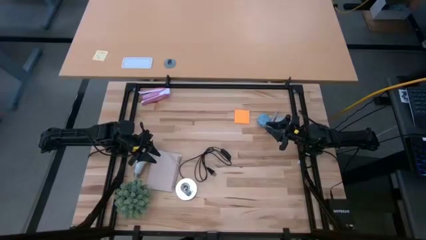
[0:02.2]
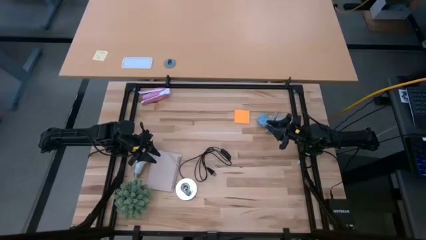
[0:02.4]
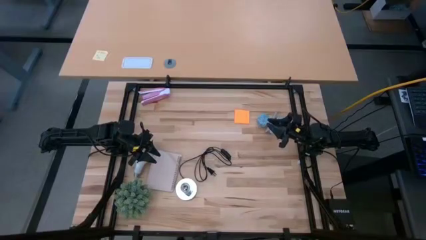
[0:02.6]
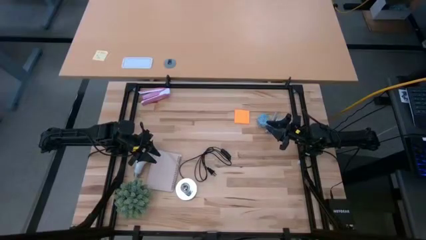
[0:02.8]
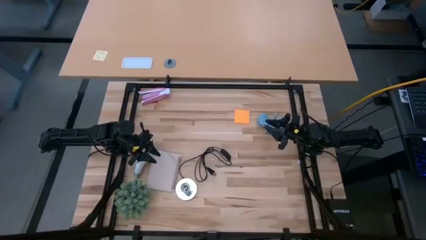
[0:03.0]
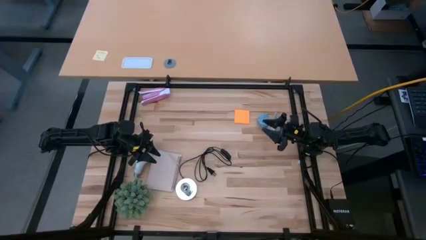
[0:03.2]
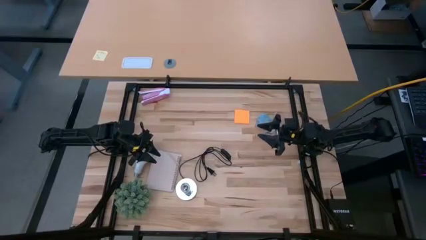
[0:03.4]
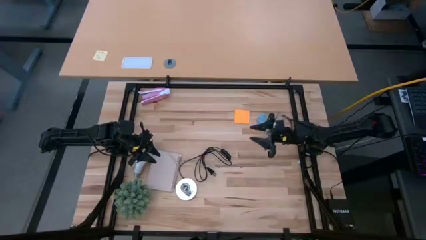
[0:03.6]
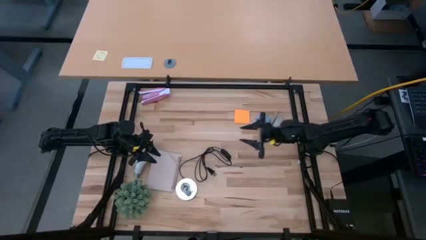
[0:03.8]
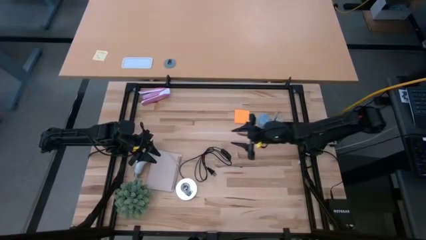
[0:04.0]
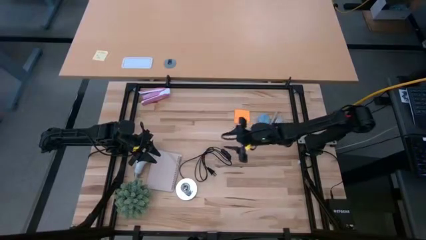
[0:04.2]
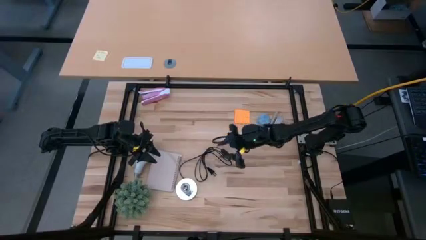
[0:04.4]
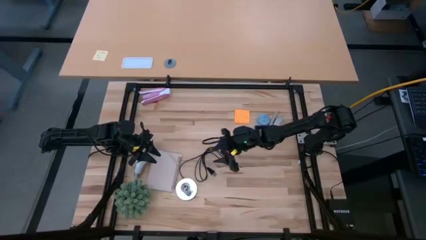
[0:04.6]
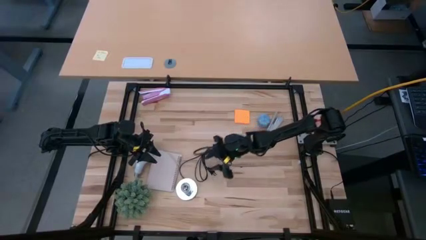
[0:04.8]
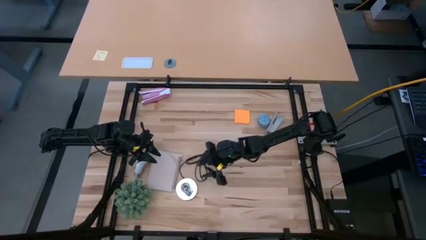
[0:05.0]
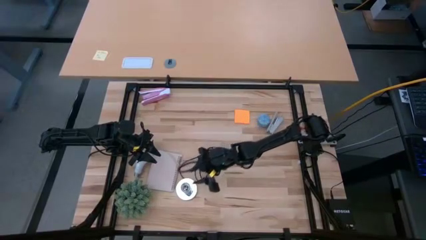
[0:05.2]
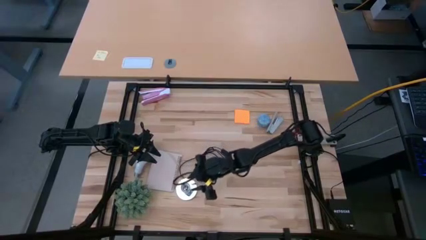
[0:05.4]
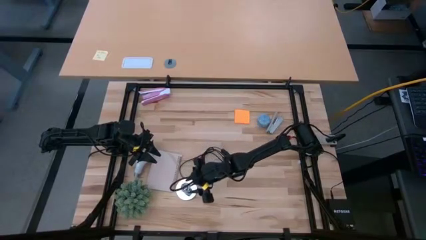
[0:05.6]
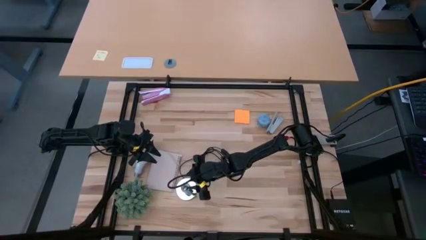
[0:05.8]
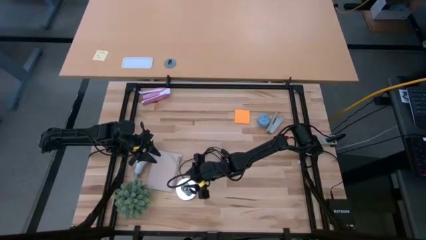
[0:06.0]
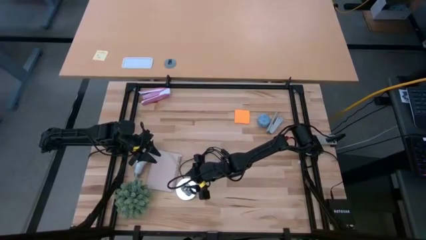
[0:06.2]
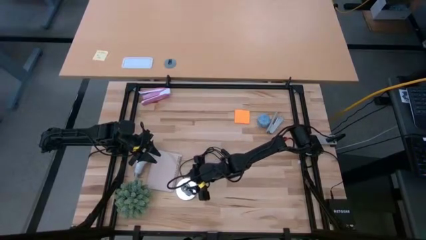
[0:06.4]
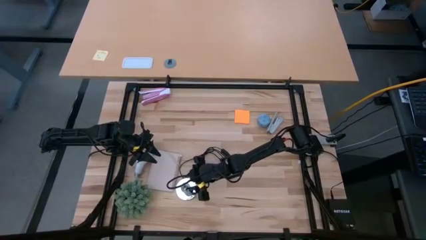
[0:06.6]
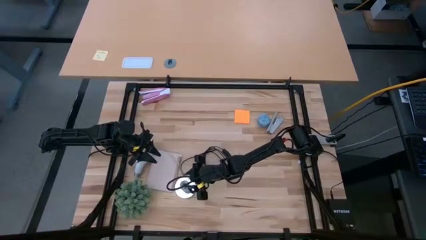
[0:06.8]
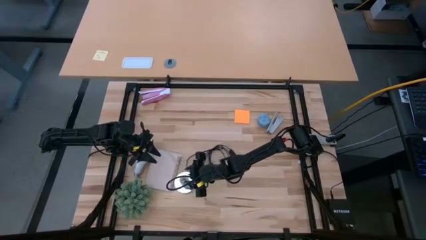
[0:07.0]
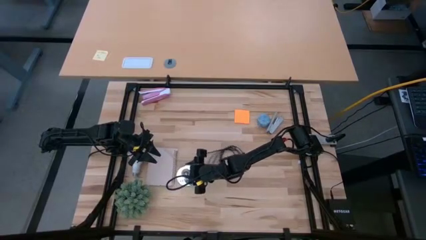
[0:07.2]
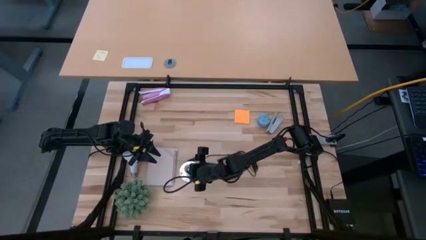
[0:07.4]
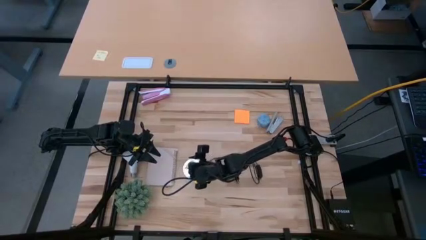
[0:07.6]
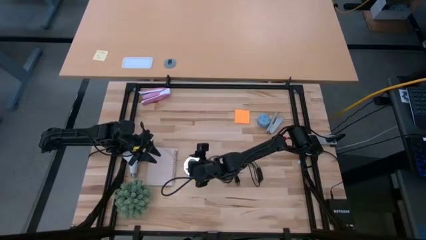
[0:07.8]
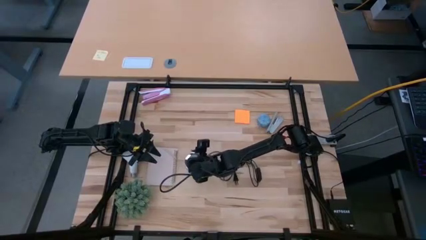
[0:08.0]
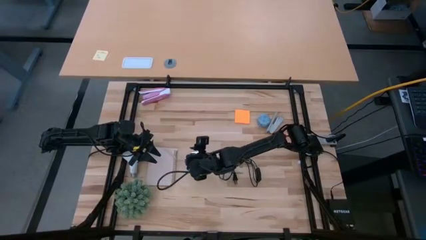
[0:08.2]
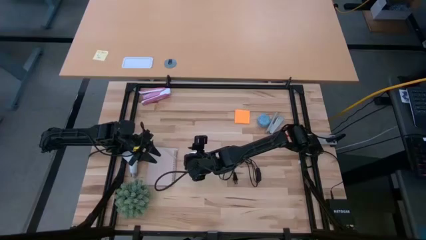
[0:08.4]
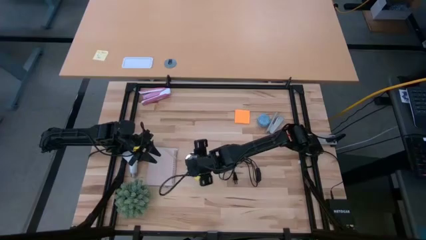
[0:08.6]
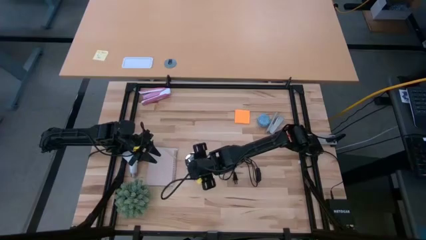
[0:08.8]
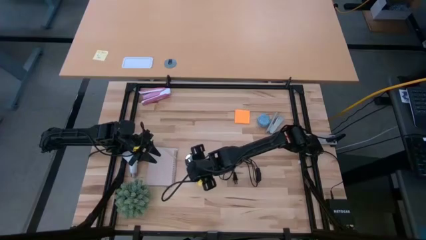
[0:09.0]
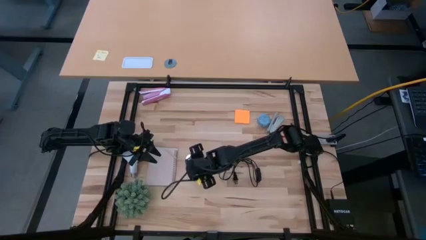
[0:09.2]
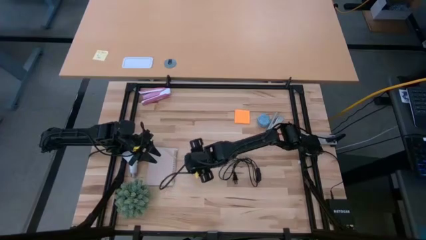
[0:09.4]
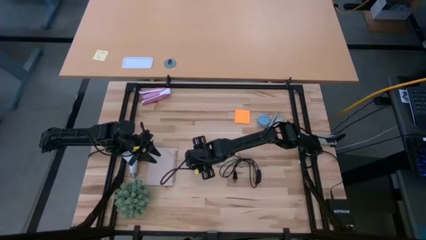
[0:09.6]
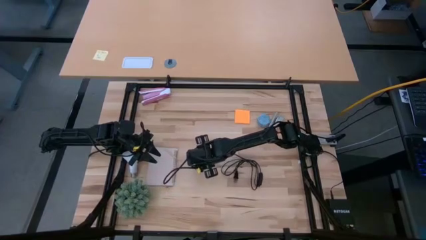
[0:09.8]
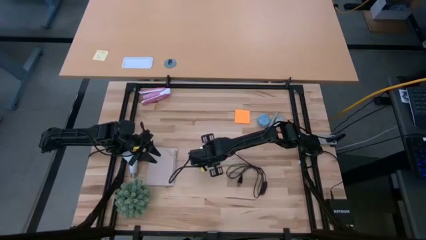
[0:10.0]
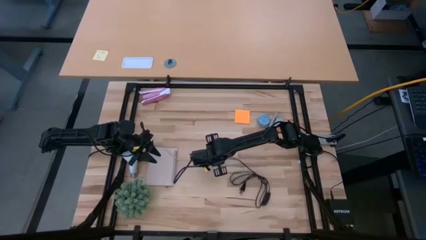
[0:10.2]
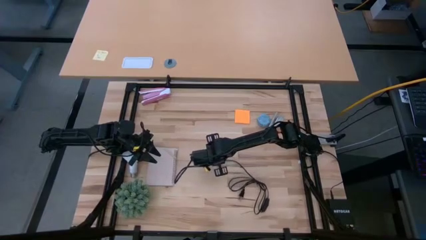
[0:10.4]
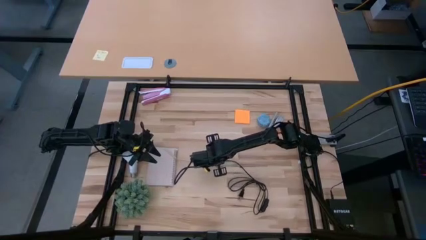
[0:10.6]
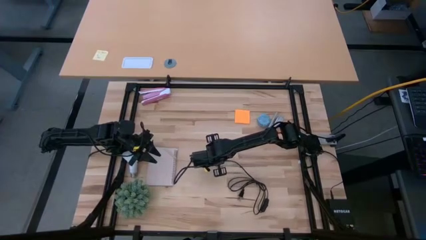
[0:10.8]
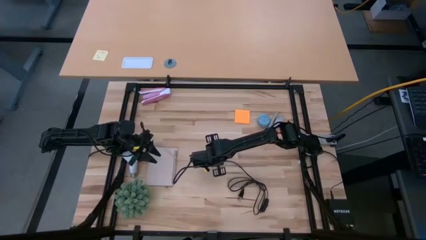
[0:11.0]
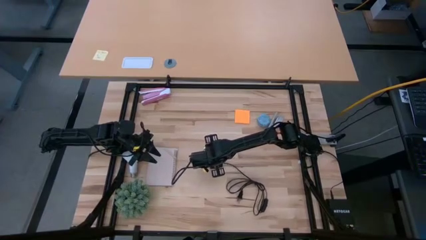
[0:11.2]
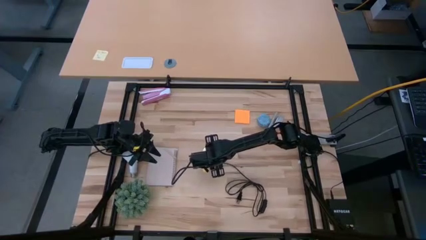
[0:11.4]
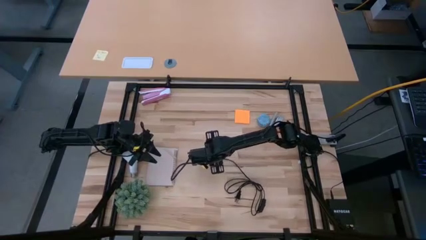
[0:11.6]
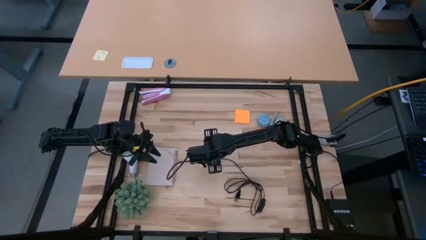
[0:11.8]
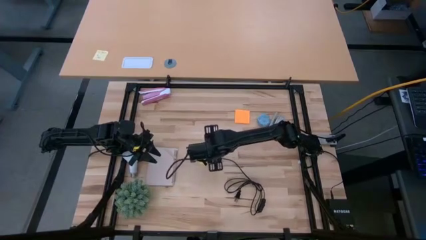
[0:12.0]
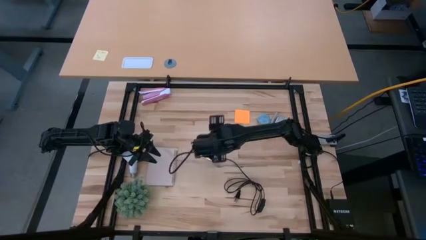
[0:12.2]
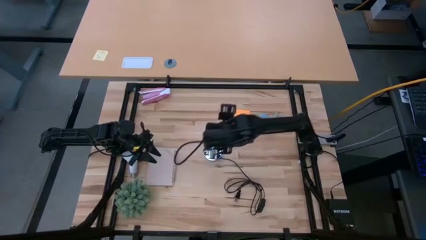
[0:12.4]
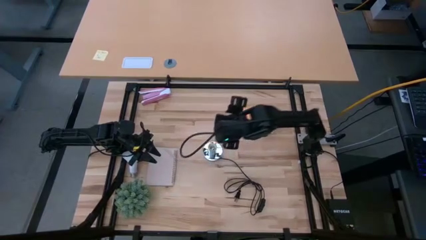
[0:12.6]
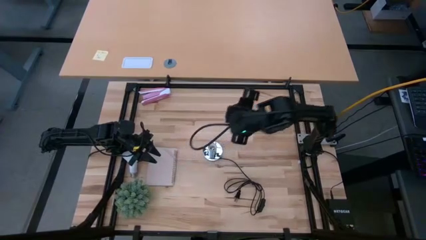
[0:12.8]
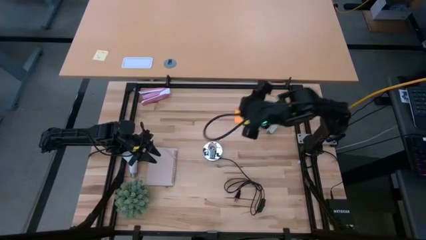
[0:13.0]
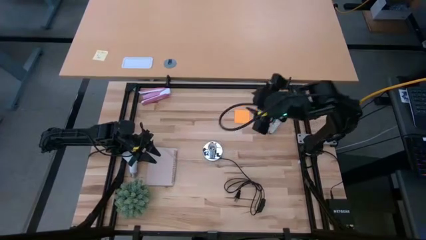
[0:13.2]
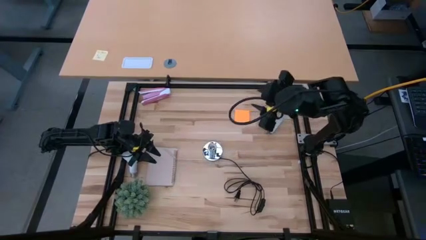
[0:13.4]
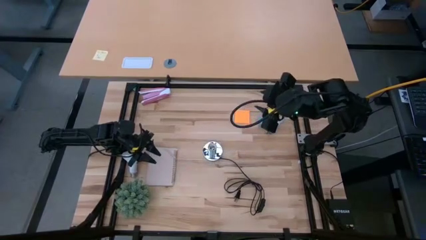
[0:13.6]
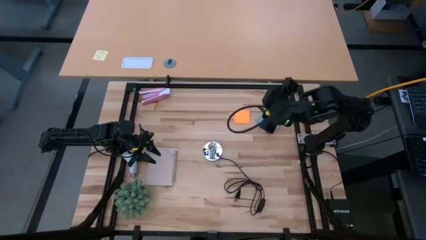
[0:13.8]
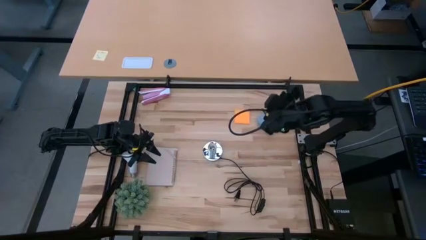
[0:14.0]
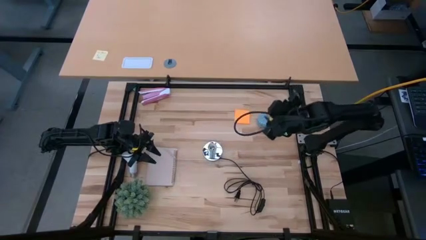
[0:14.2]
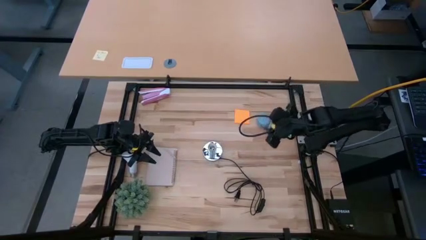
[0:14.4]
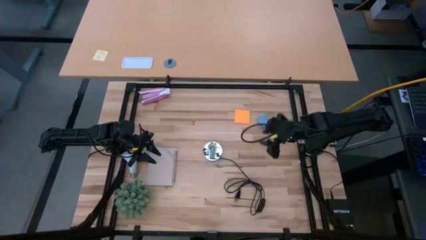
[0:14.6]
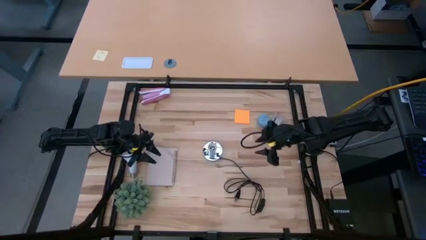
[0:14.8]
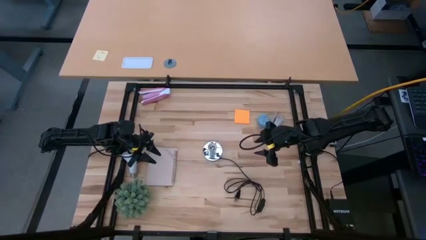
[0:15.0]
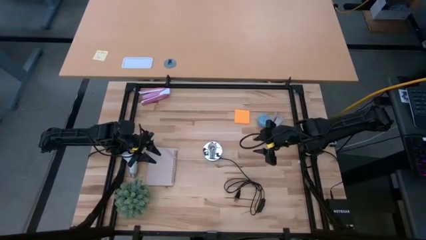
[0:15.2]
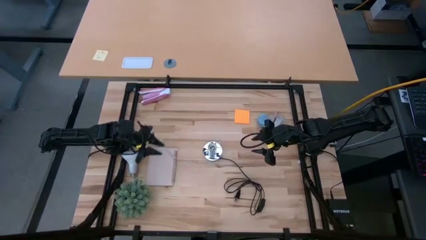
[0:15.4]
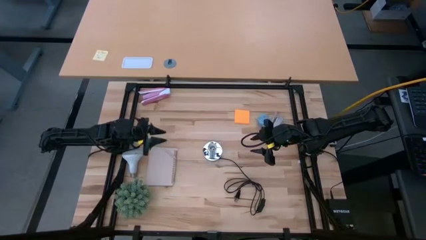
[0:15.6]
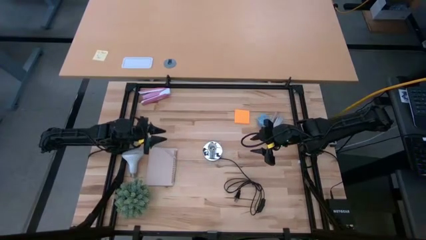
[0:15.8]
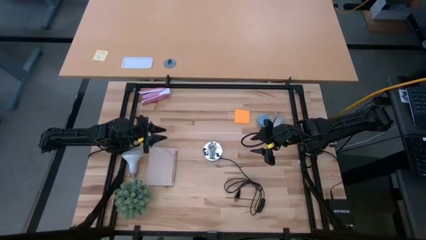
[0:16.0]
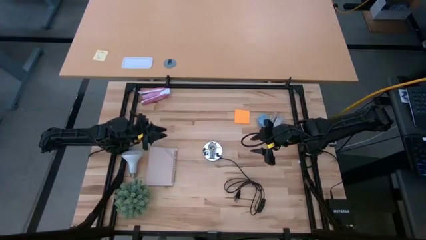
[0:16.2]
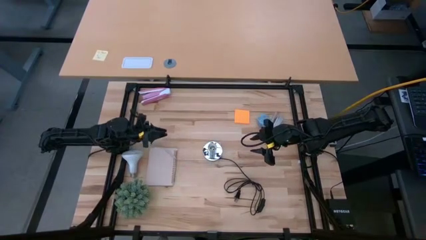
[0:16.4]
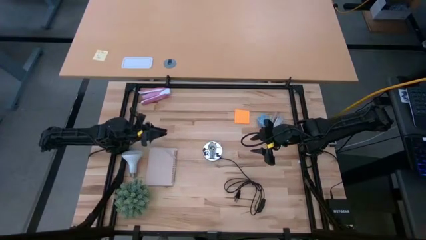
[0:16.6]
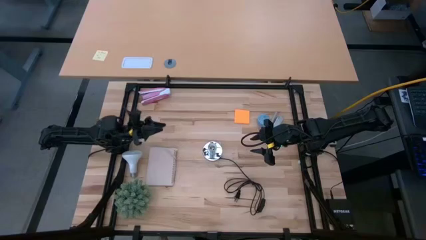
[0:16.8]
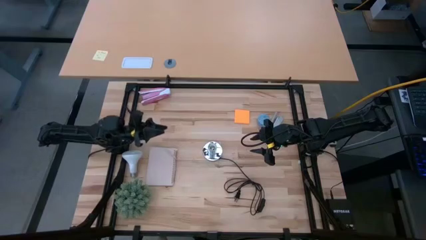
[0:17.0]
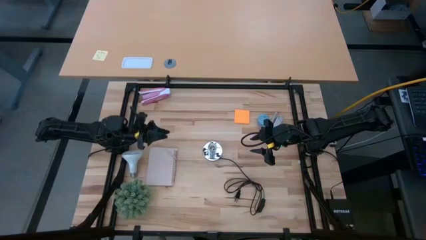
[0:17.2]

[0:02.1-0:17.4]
Task: Screw lightbulb
Move the potted plant on top of the table
